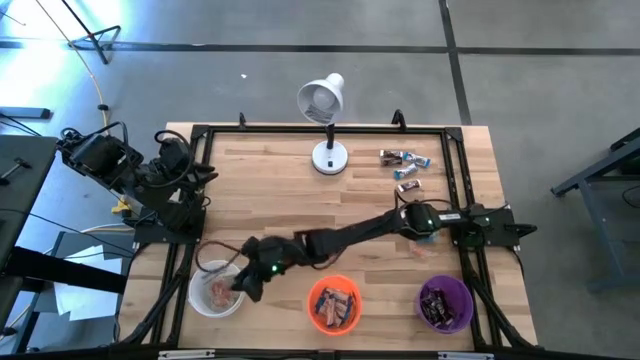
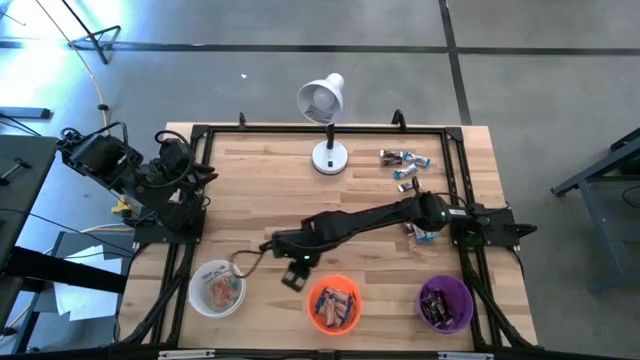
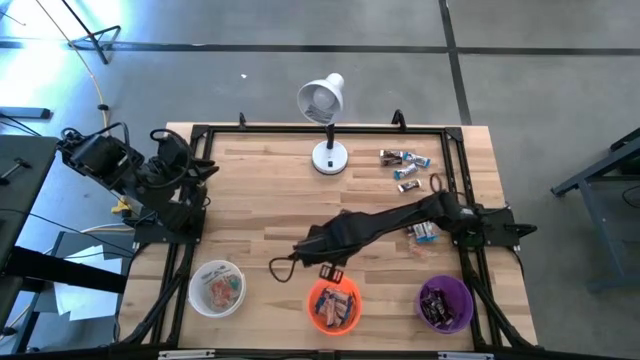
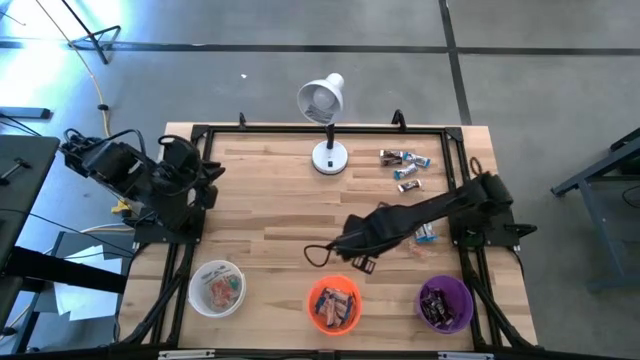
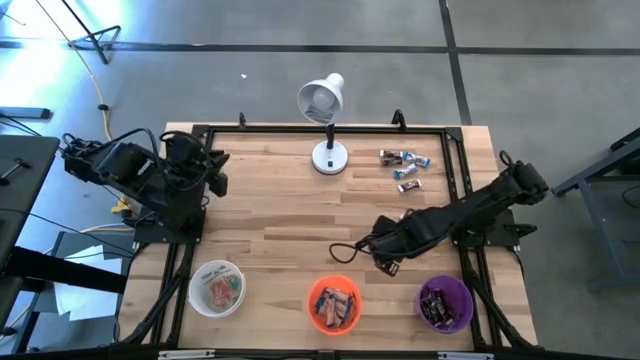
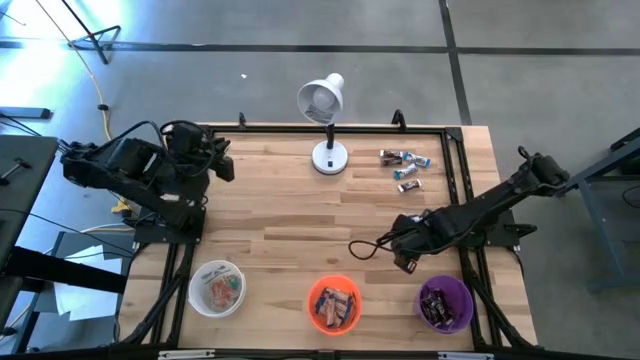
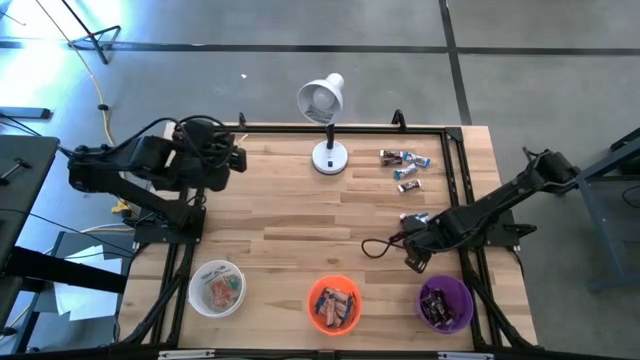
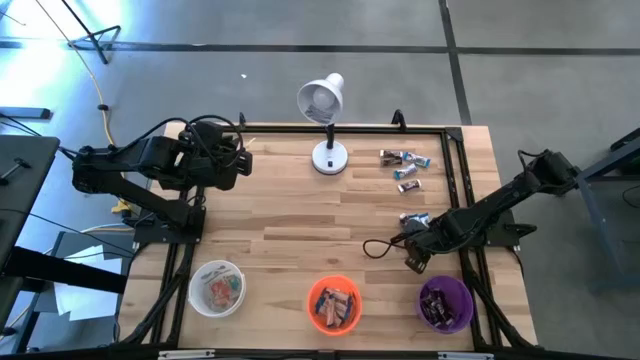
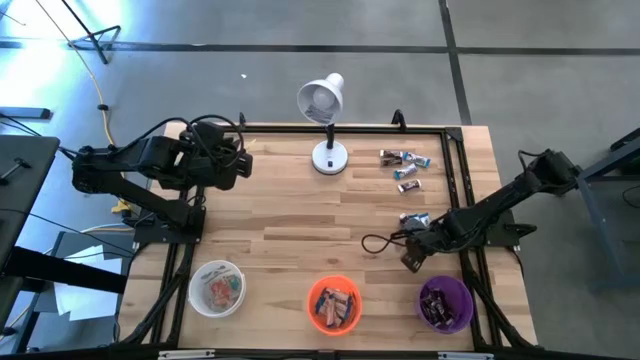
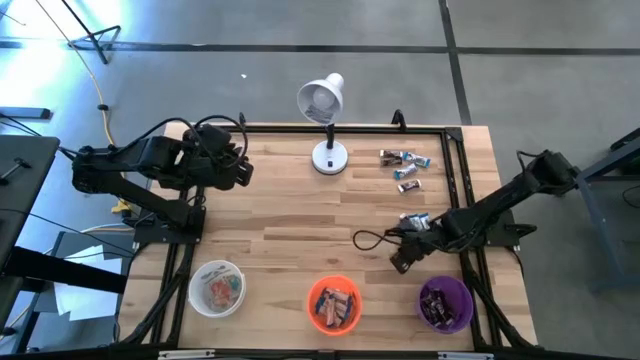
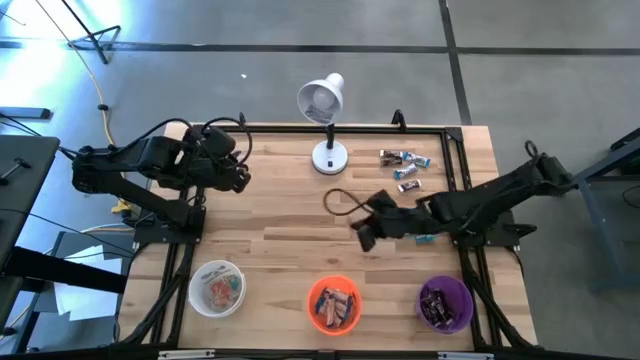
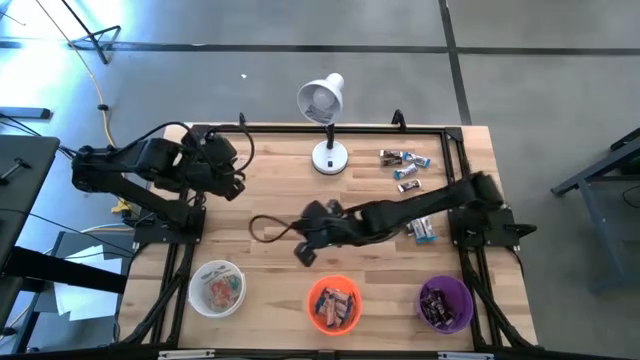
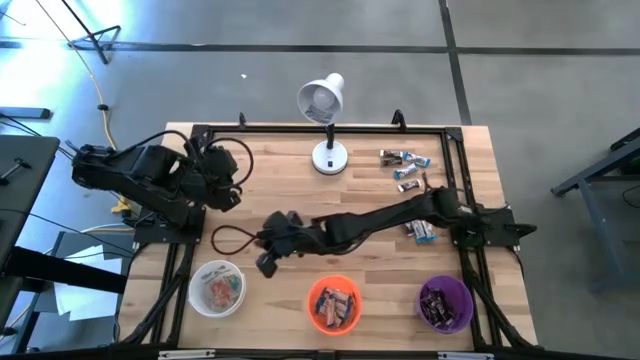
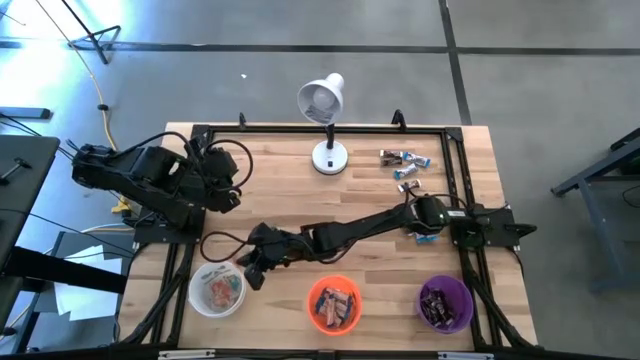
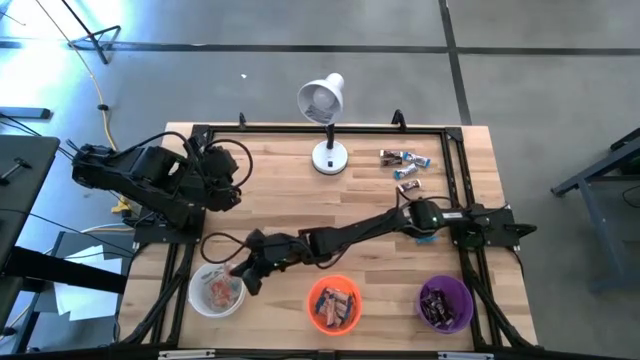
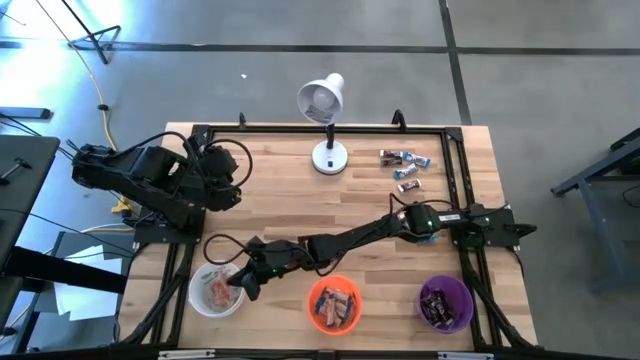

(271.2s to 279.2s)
Task: Organize candy in baskets
Put the orange gummy into the white bucket

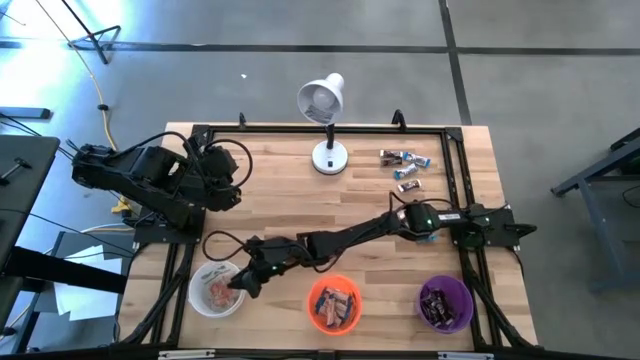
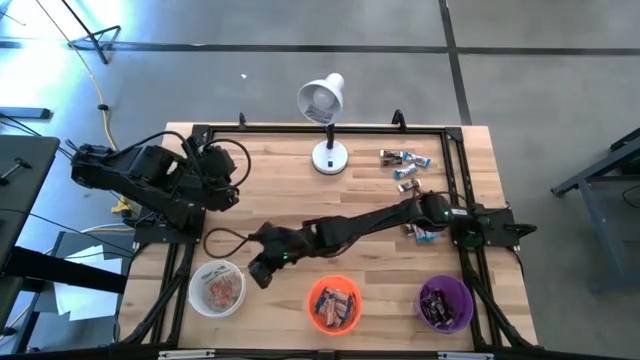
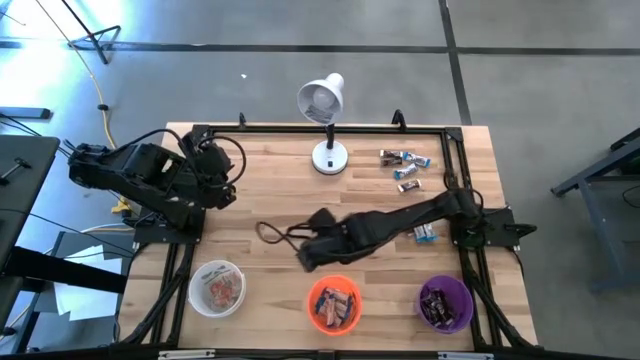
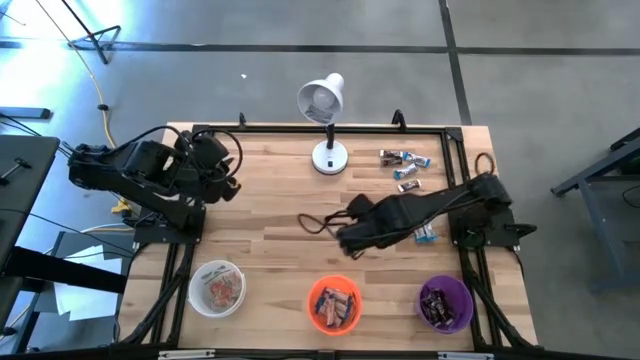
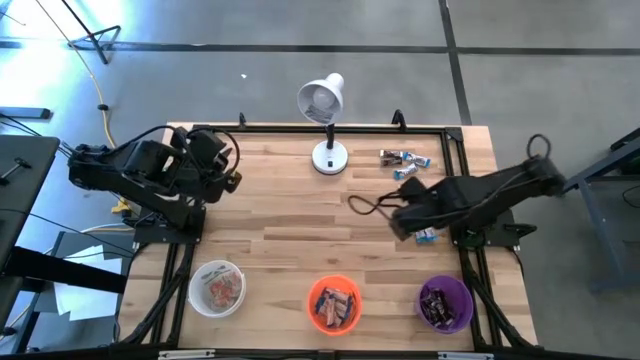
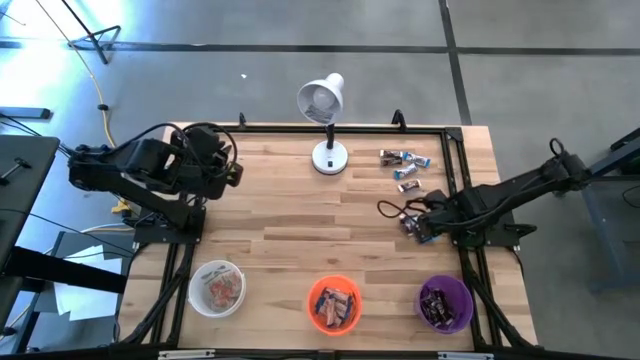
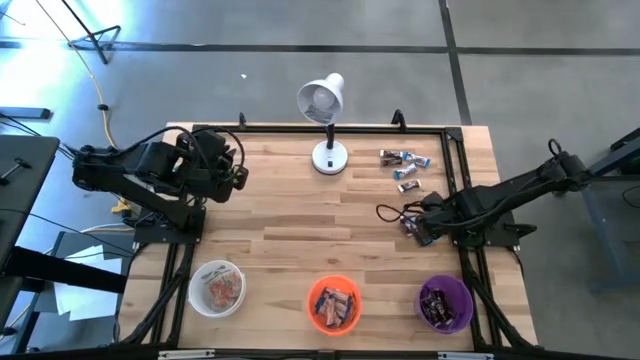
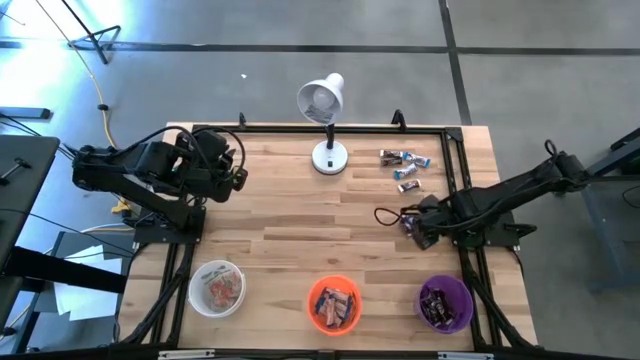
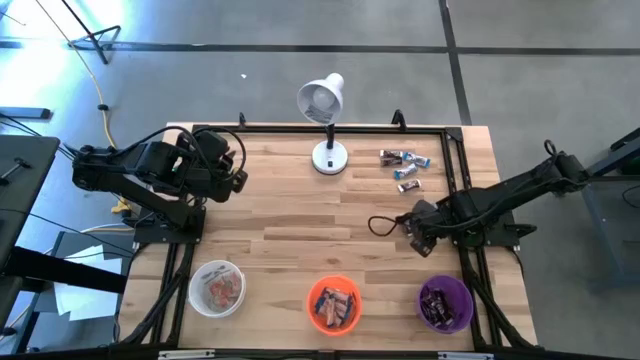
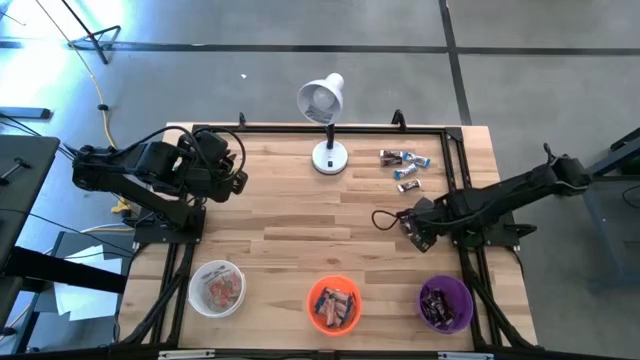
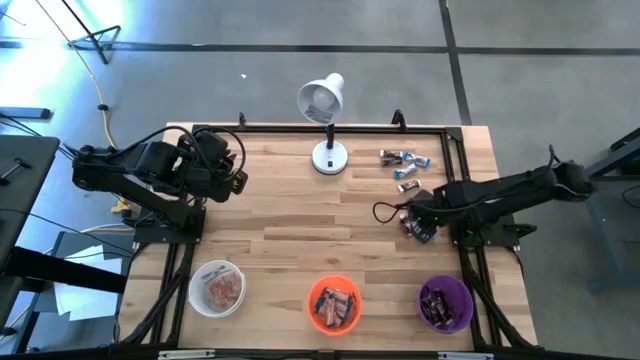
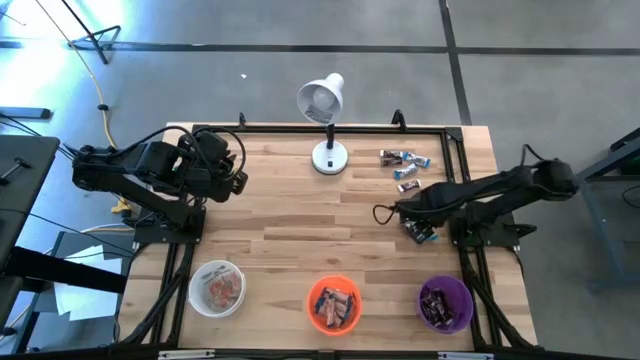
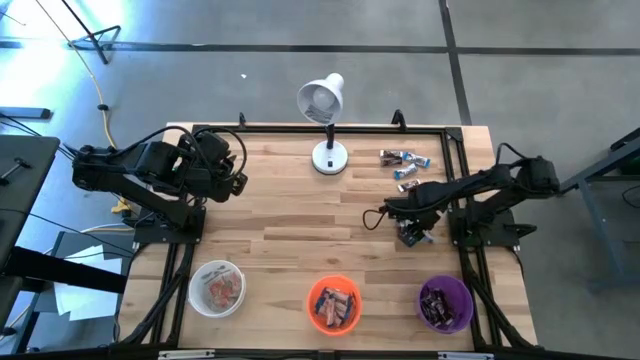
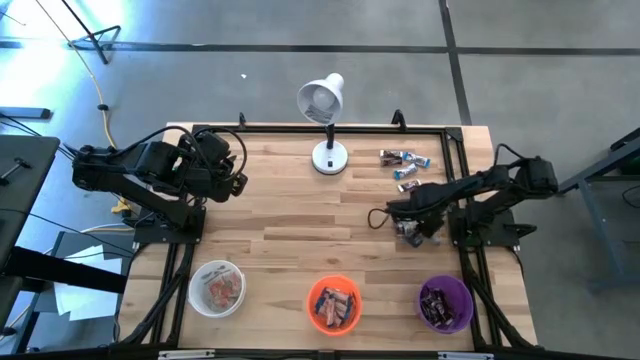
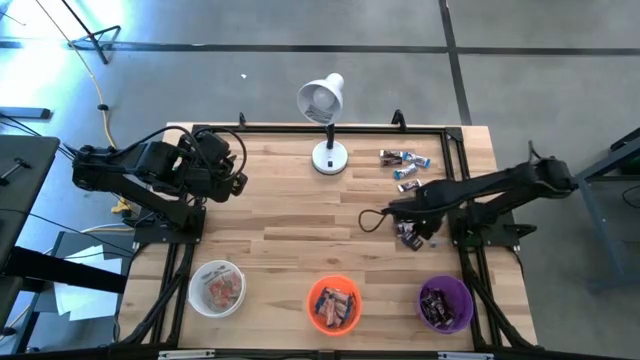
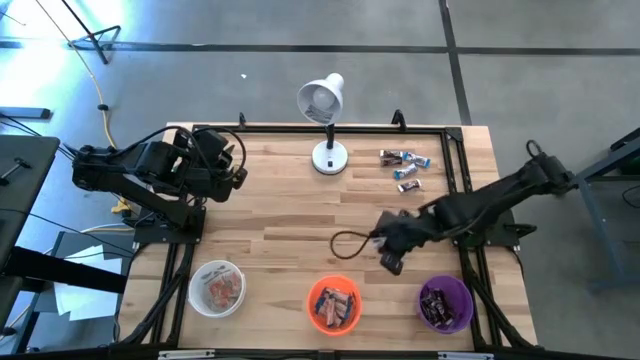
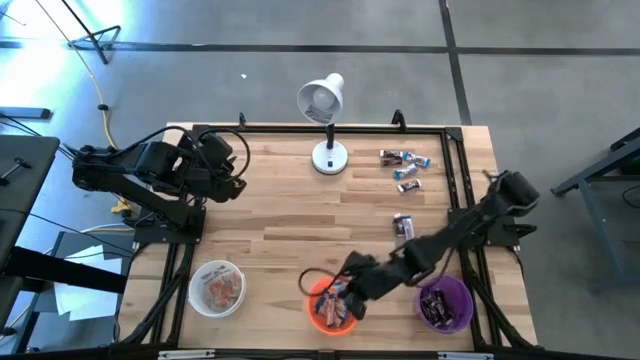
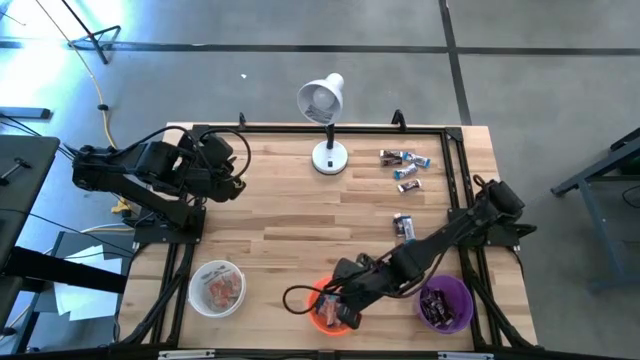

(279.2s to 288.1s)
Put the white chocolate bar into the orange bucket

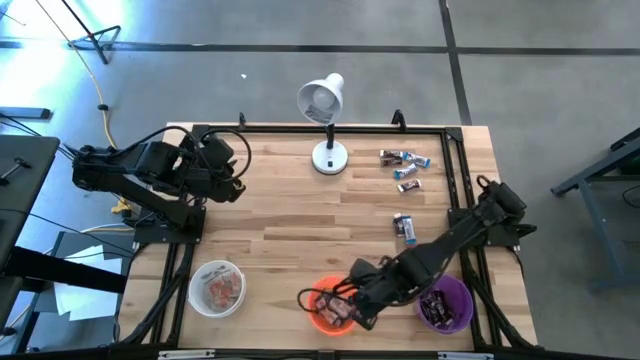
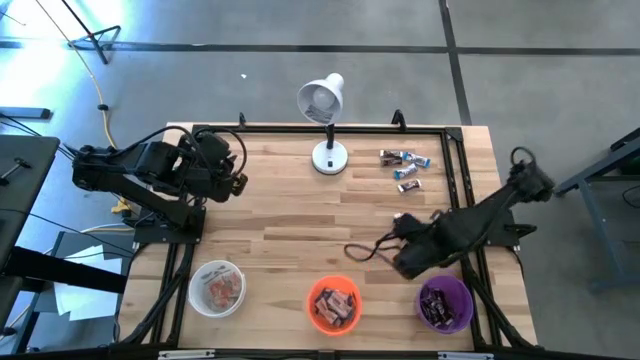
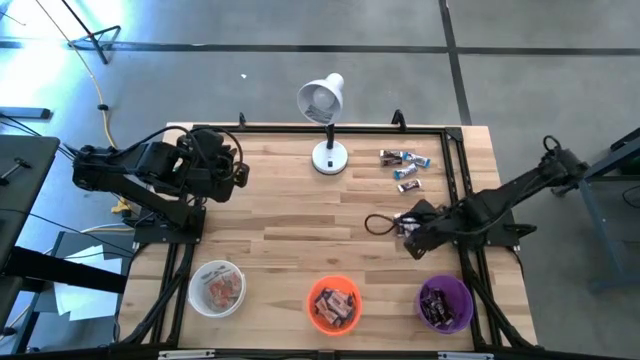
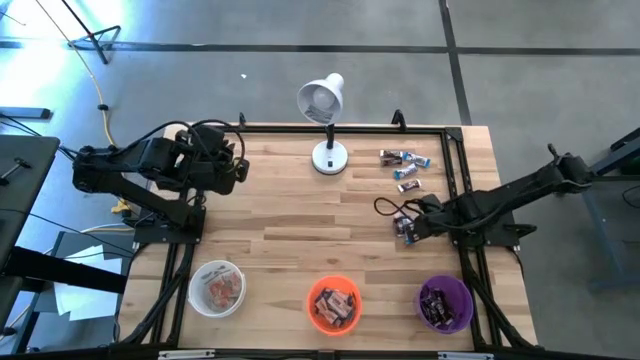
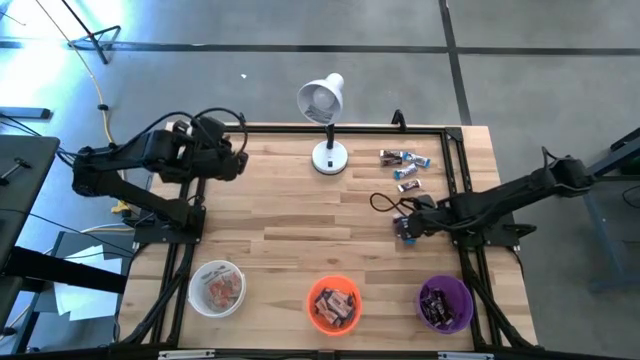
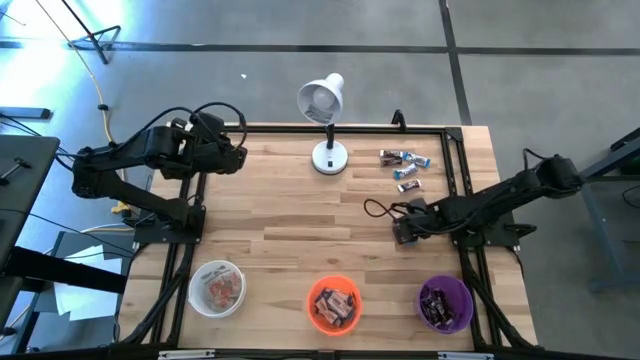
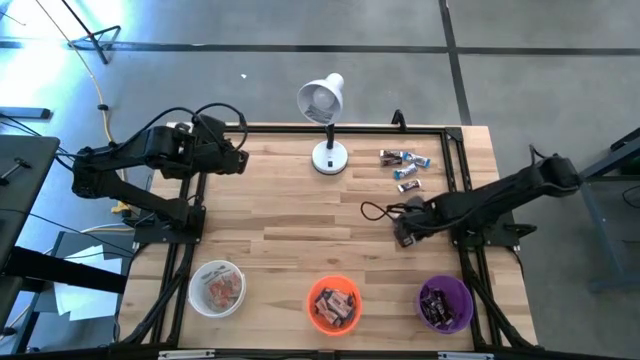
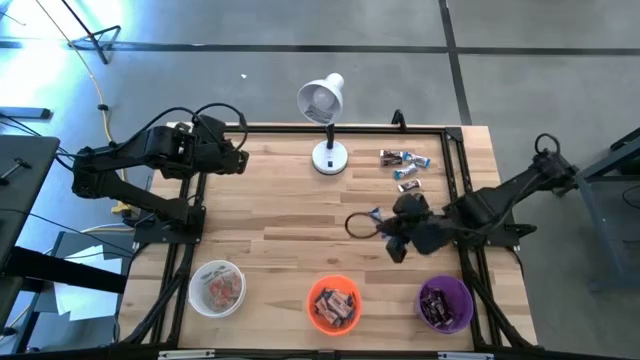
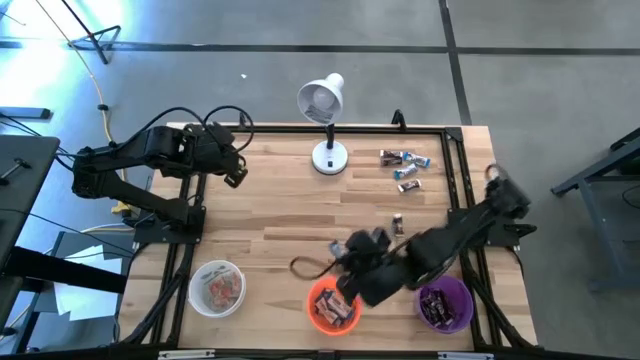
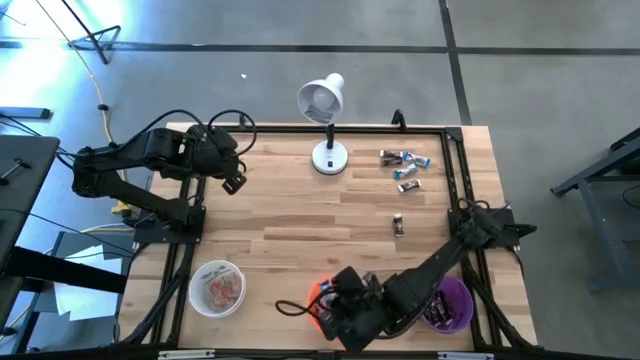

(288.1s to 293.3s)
Put the white chocolate bar into the orange bucket
